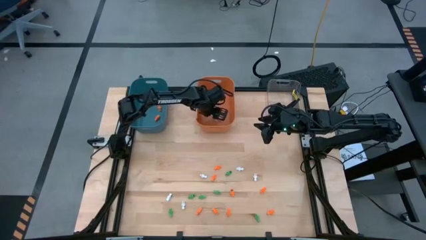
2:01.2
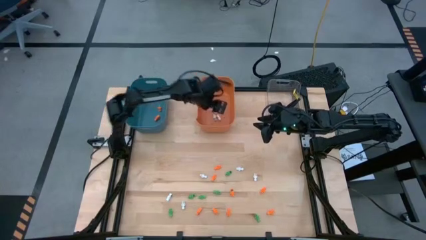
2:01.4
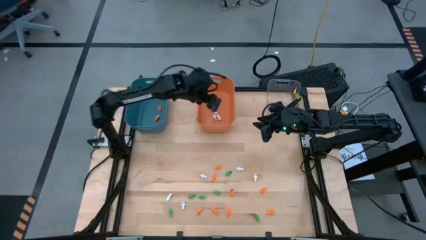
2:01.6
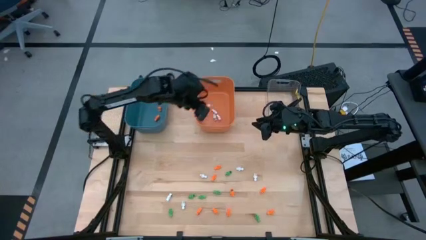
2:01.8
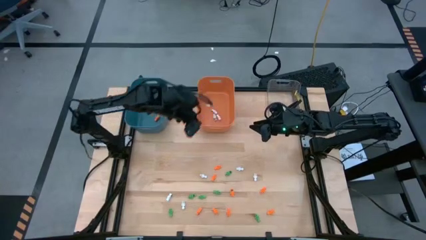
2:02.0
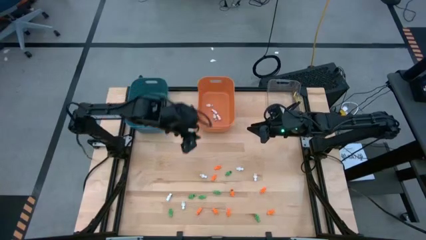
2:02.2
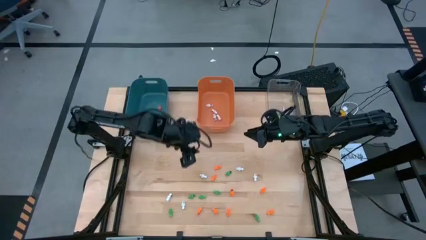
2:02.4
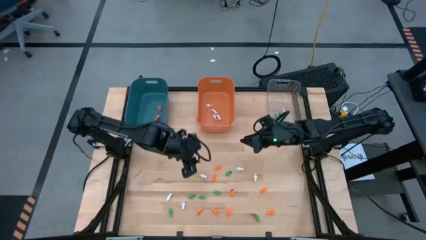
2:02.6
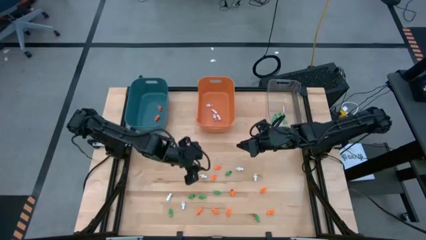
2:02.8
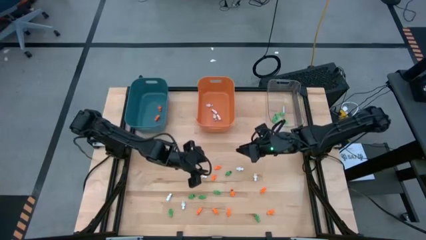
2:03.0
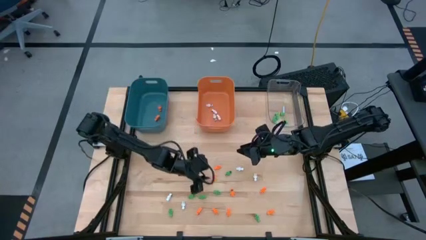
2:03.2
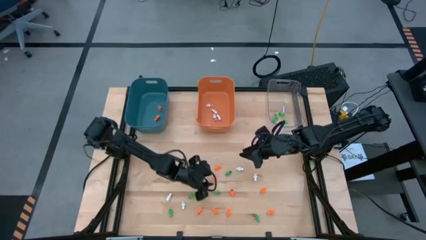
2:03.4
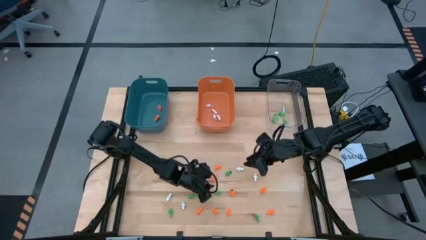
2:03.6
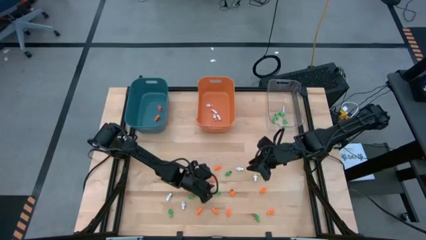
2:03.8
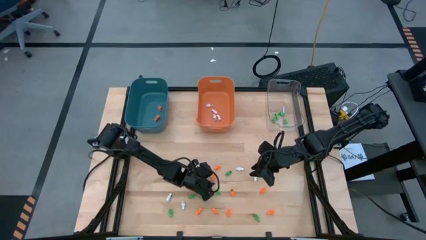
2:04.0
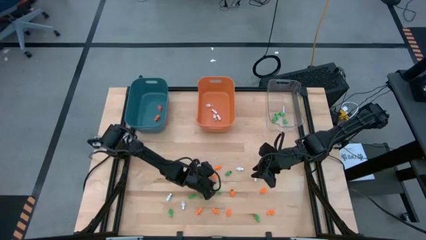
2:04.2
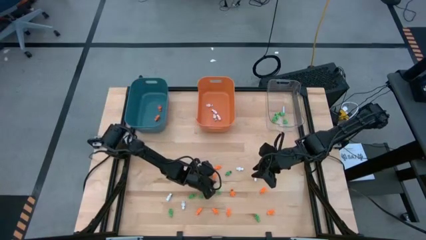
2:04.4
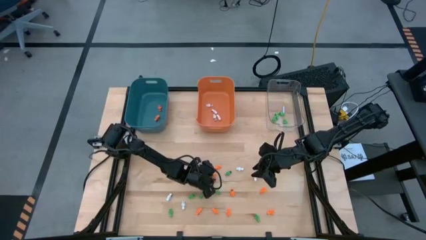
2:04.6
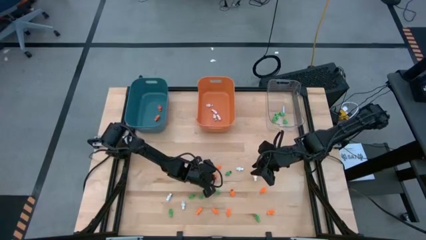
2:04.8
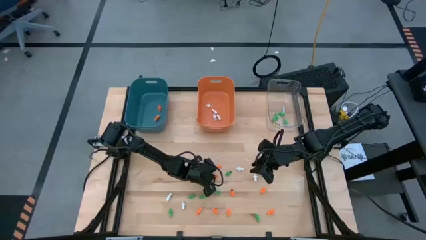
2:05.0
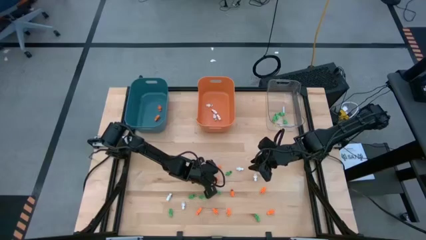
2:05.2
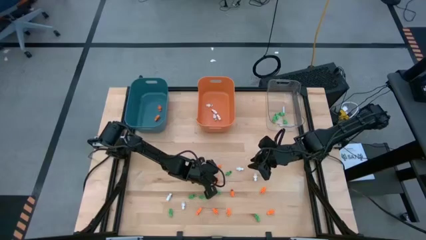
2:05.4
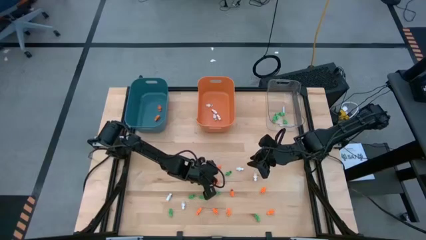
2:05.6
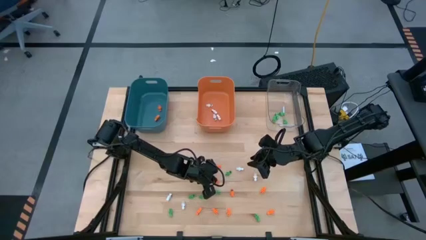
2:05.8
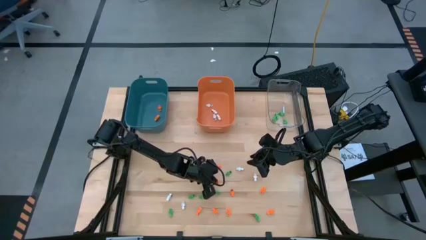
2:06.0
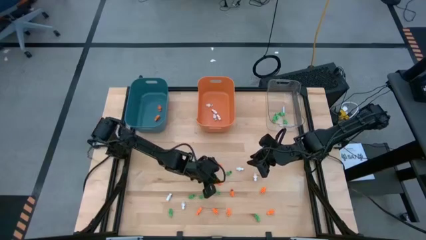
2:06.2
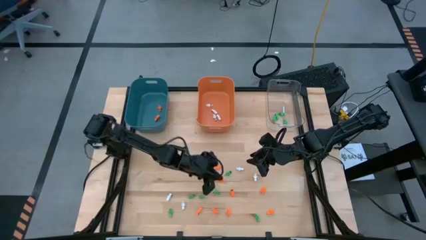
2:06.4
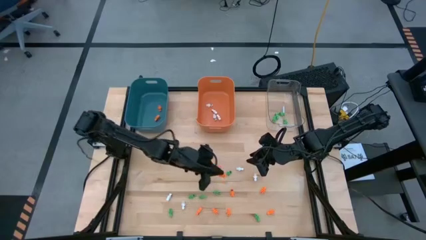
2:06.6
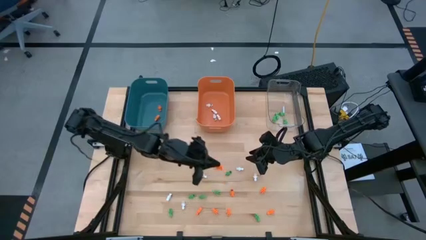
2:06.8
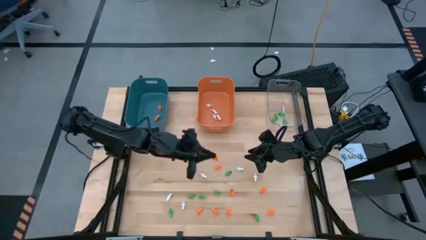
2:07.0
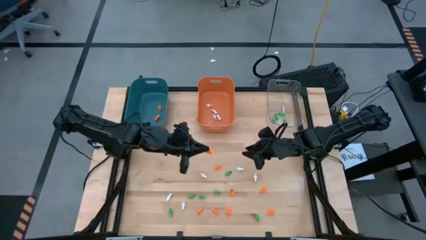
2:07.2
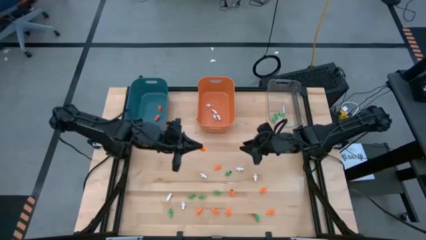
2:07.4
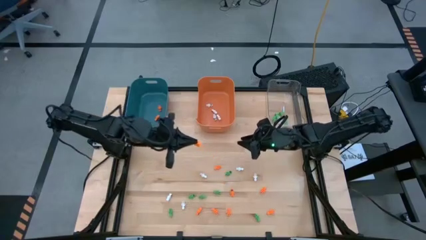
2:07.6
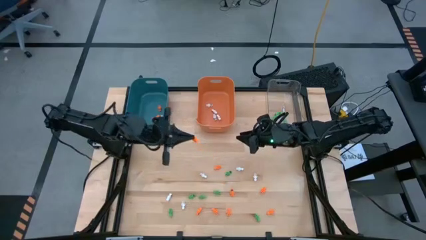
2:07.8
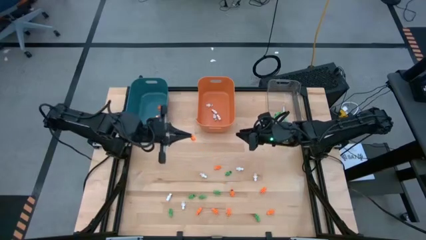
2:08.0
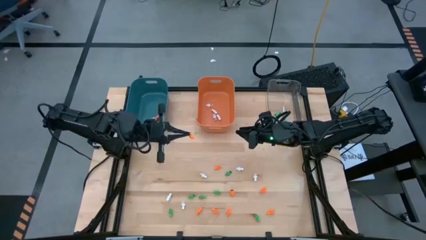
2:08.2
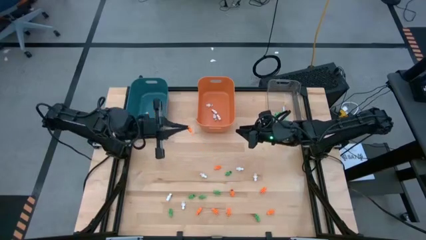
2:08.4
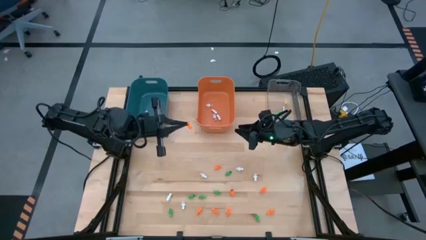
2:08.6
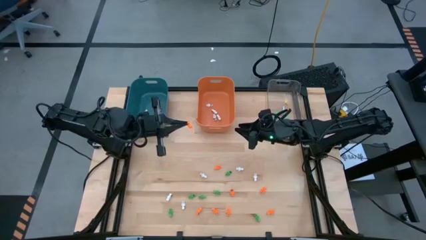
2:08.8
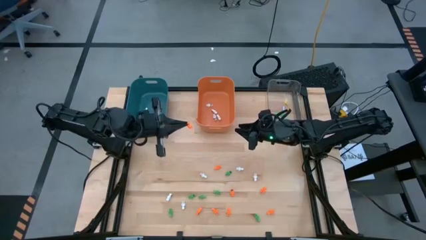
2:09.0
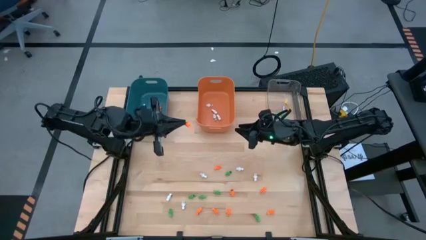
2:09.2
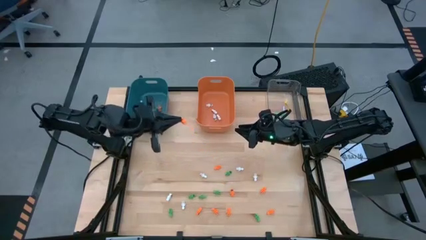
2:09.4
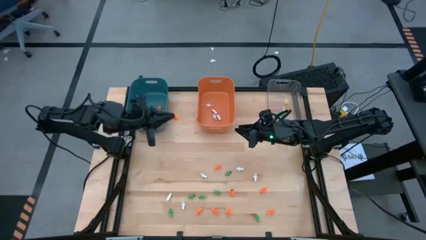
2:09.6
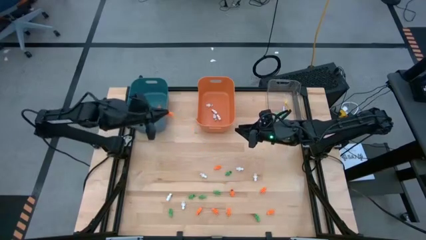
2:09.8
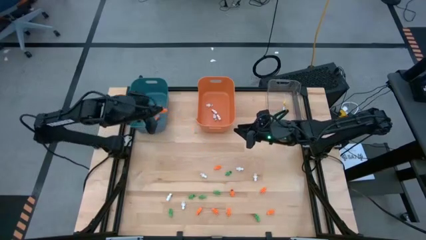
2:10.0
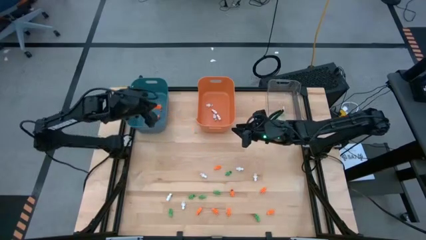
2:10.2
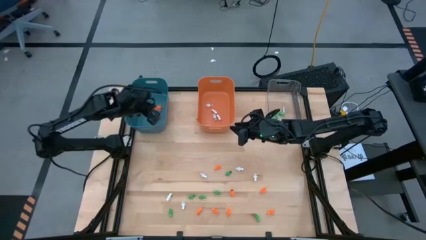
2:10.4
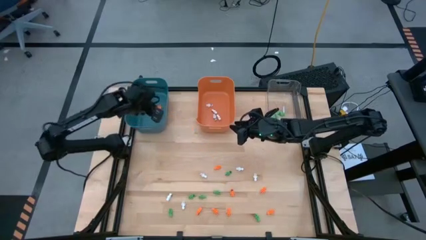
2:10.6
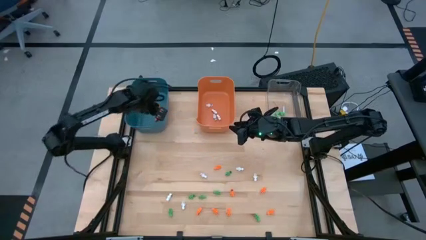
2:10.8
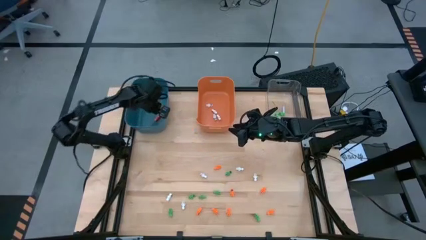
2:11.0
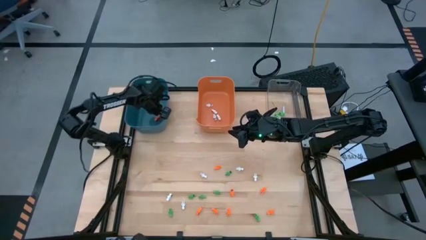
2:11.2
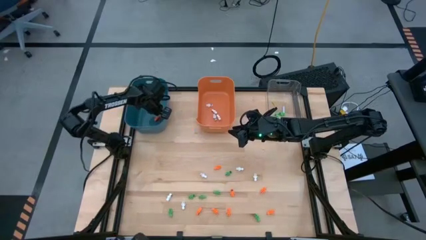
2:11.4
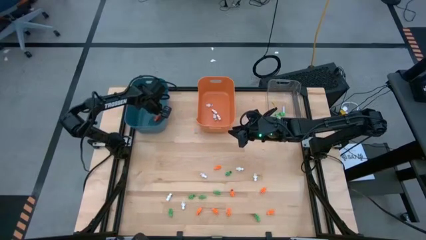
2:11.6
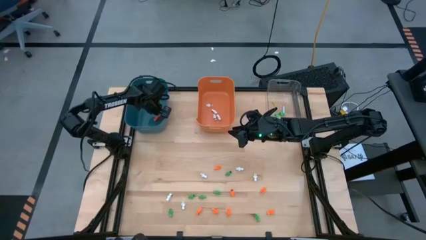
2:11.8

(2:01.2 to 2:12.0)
Task: Sort Halloween decoration
Put the orange skeleton toy into the blue bin
